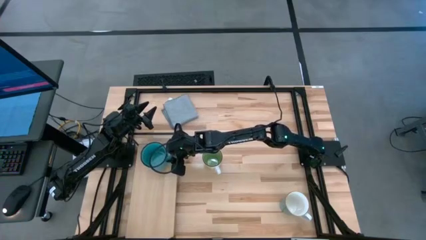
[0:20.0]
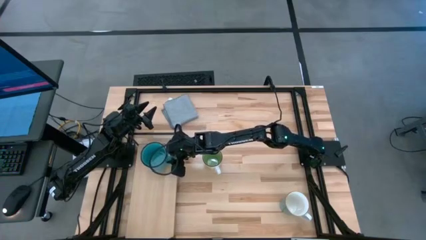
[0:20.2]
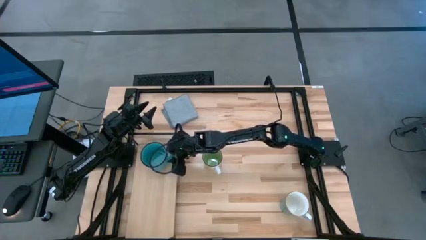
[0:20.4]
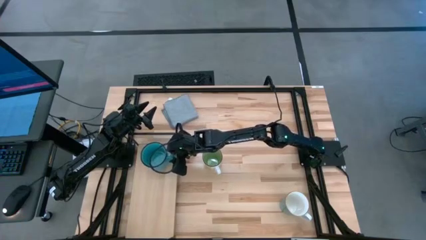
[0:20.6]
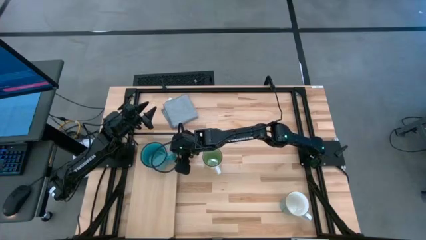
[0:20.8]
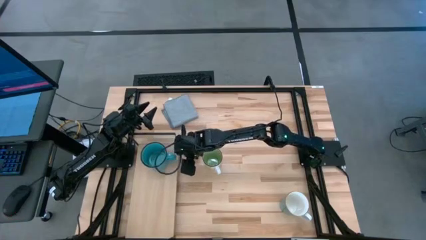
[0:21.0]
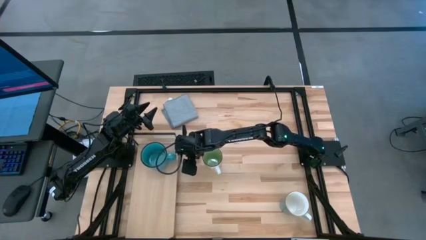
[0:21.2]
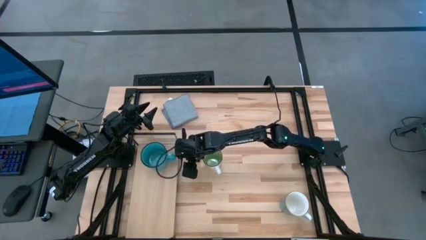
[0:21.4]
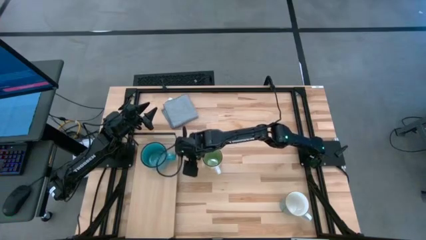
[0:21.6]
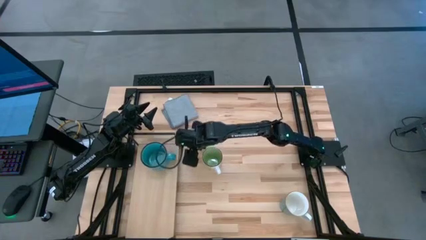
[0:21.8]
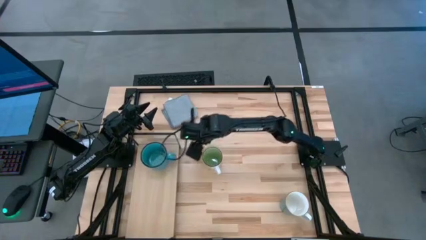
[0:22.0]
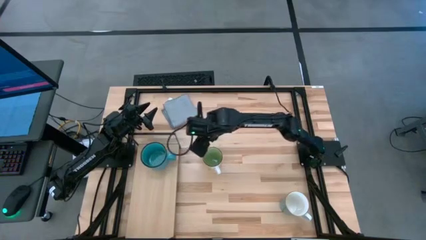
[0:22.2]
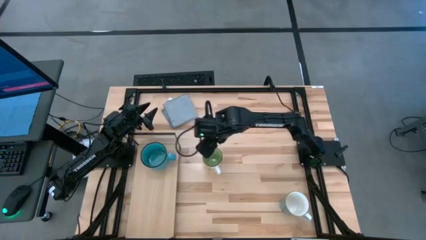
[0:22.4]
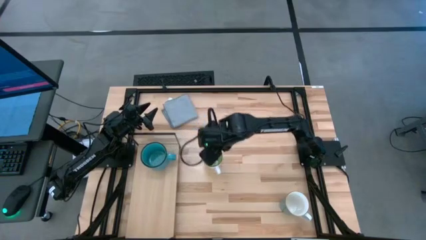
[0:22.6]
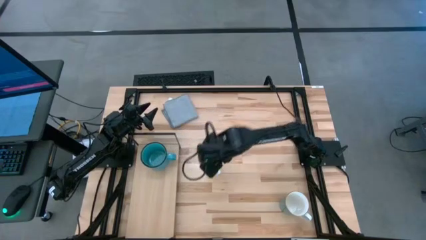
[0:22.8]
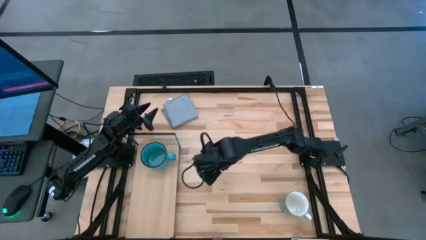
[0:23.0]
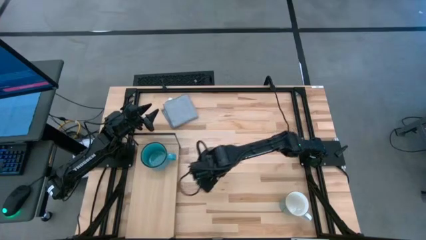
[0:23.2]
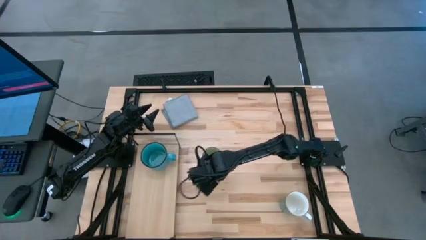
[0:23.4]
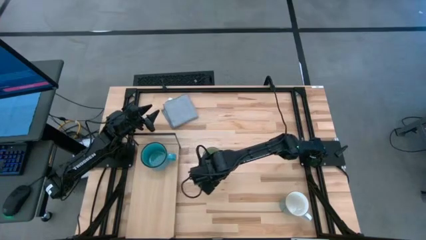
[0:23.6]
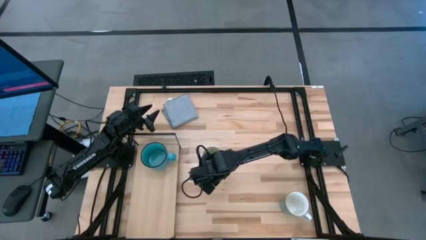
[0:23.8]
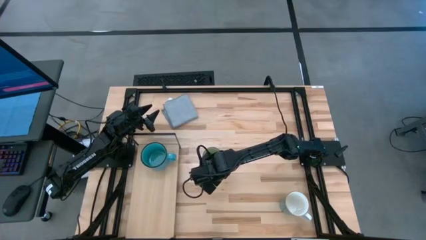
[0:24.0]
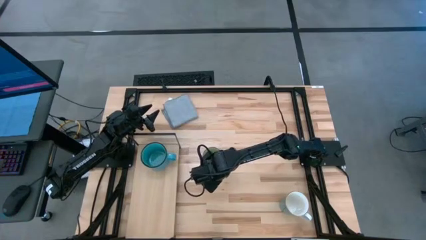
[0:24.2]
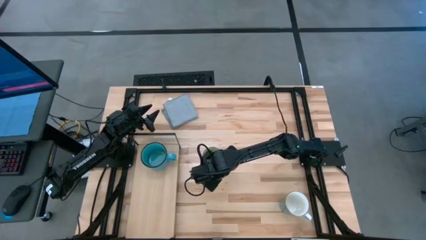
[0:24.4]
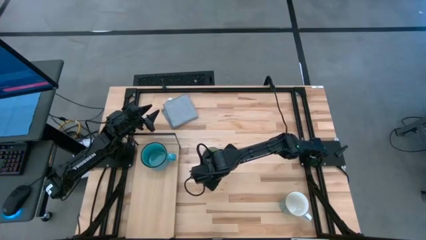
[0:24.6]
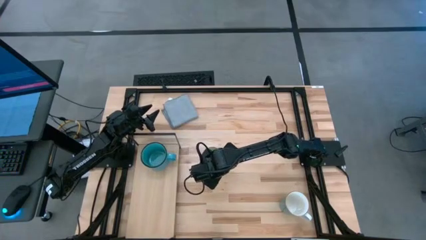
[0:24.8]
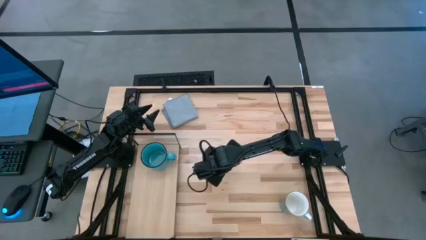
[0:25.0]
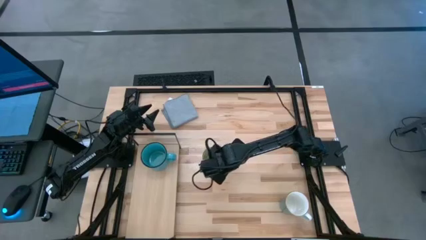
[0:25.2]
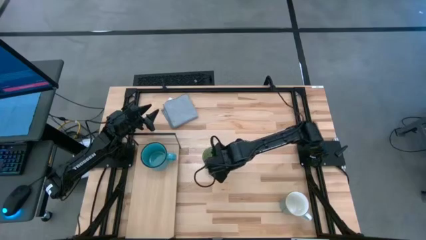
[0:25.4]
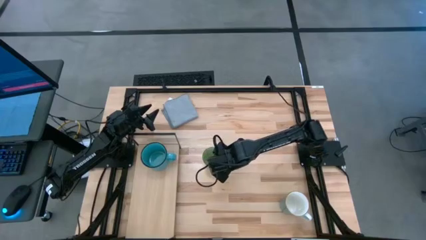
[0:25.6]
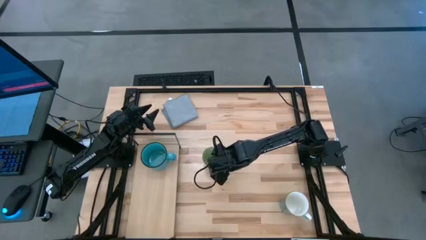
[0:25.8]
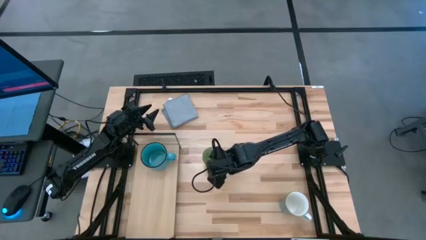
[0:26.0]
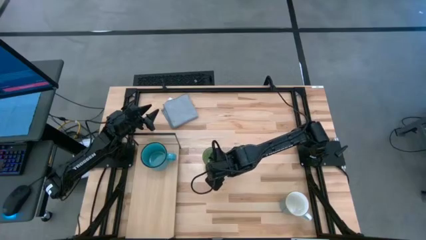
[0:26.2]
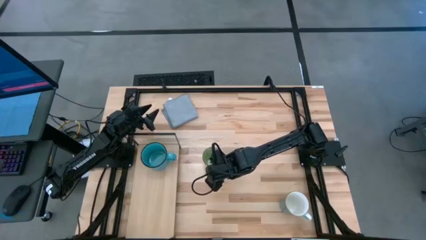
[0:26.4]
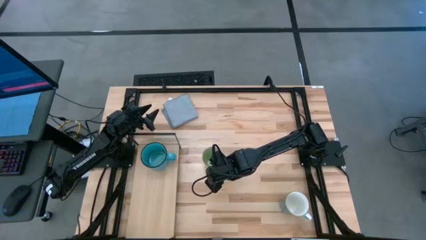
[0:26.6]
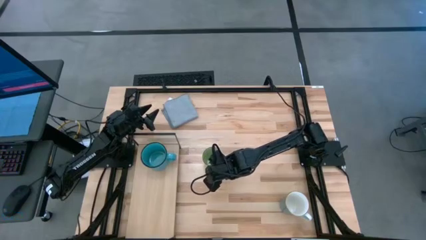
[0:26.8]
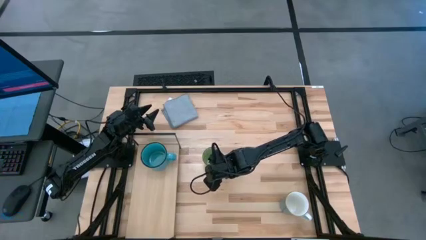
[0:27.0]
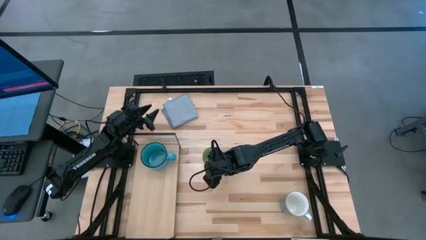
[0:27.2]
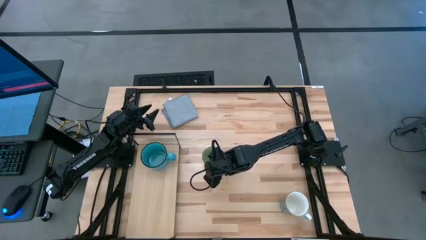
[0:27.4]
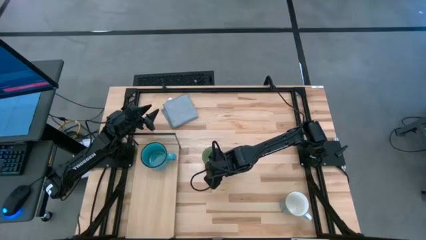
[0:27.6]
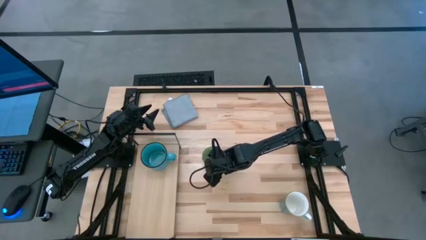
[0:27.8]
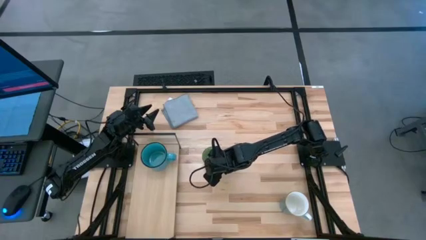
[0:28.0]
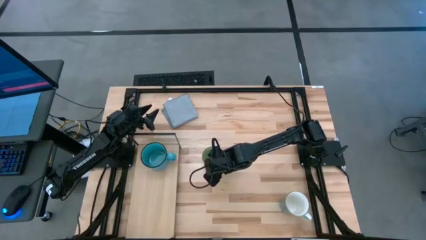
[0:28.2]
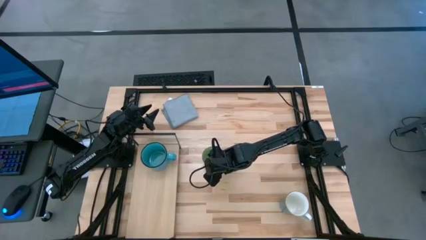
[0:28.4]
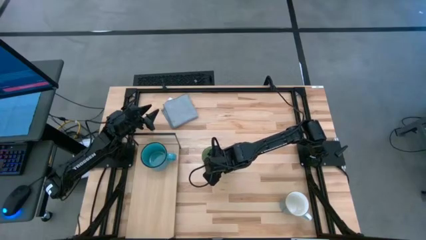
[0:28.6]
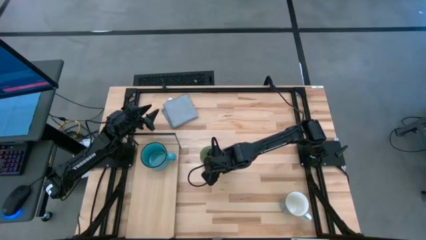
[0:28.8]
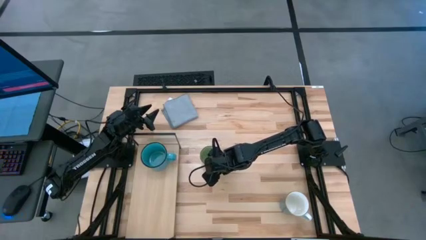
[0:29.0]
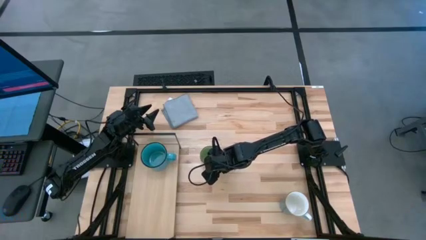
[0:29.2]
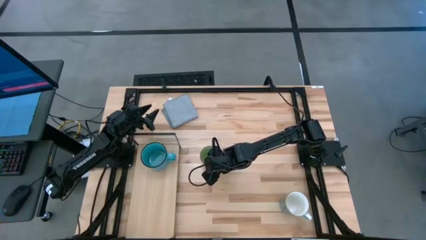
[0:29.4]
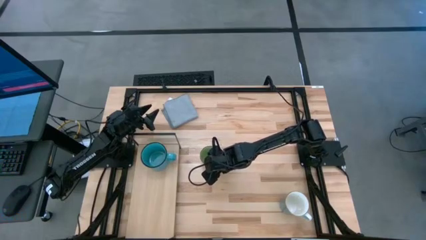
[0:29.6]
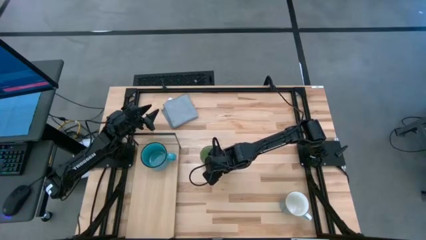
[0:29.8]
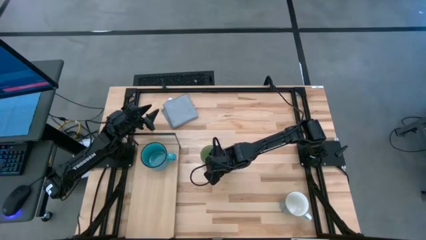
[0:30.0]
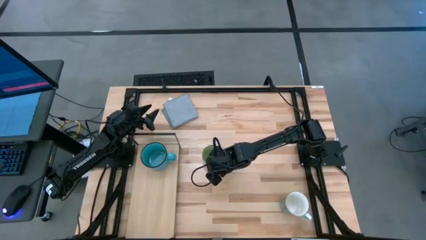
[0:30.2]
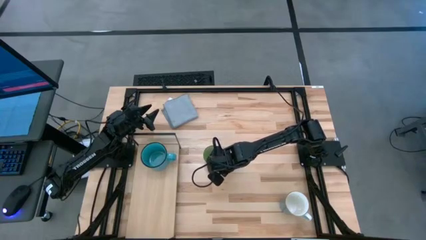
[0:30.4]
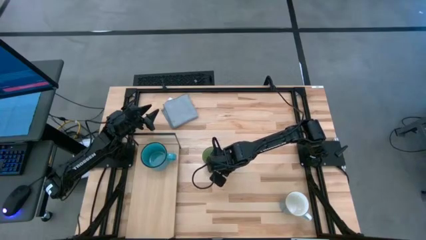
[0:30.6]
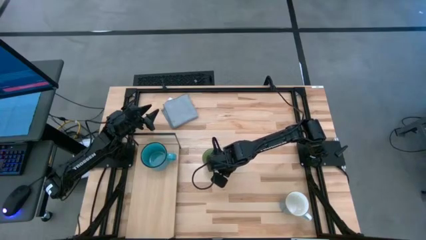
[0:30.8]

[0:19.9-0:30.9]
Task: Stack small to large cups/mugs on shelf
Put the green mug on the shelf
